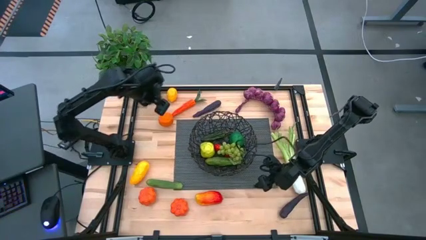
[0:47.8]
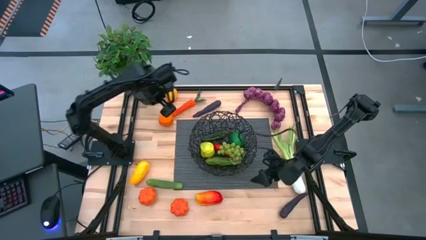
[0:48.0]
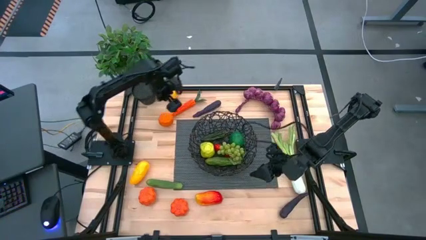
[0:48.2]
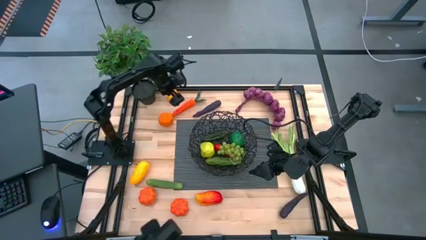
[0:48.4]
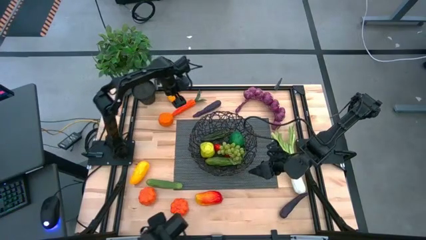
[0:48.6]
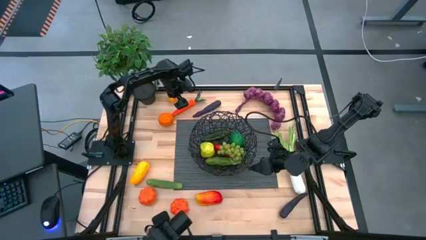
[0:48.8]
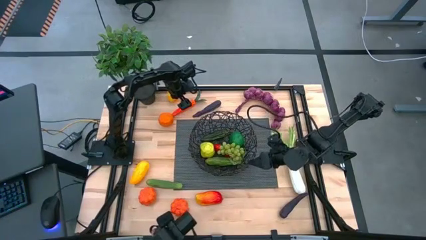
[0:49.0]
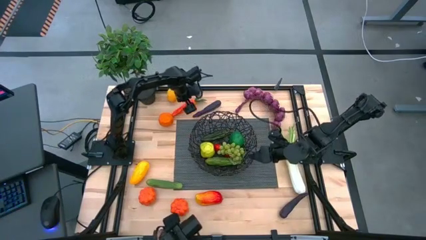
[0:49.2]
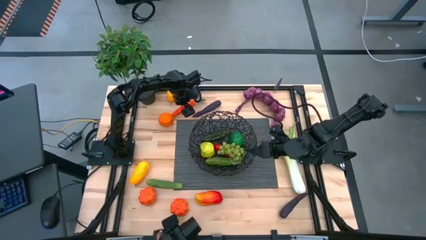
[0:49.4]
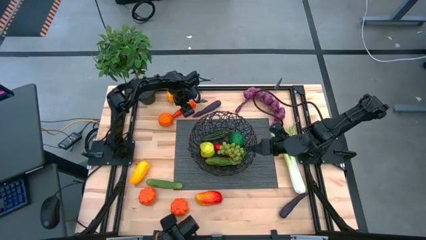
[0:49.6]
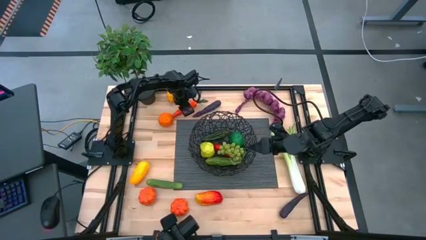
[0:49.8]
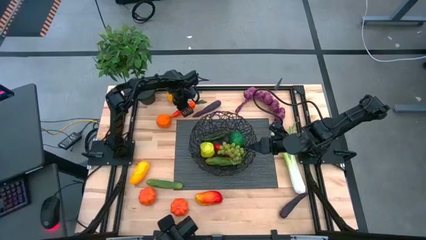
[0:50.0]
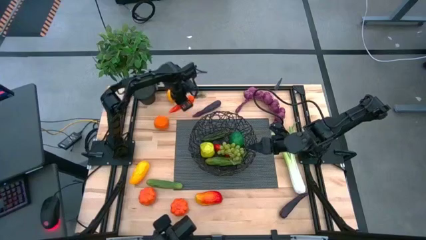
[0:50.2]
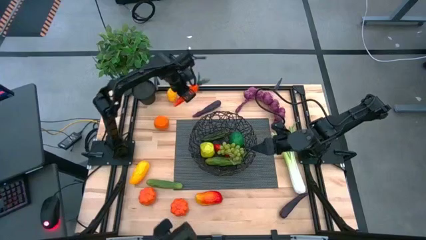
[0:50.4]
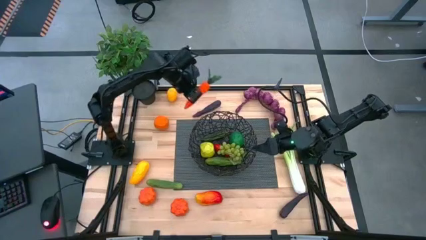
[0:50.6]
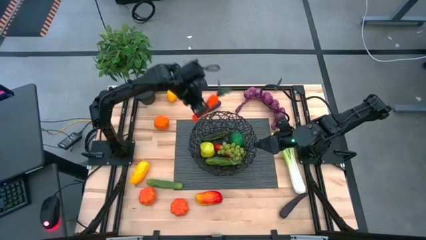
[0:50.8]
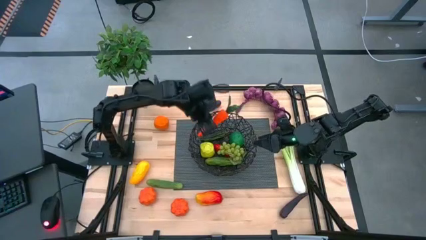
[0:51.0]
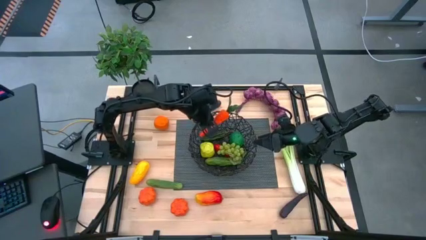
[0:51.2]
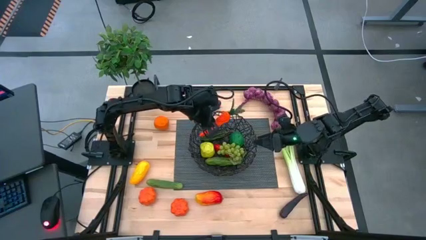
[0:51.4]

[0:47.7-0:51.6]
Task: Build produce basket
Put the carrot into the black basket

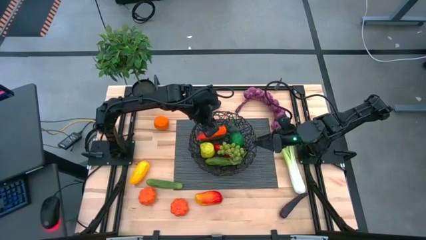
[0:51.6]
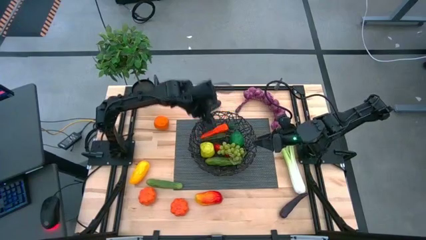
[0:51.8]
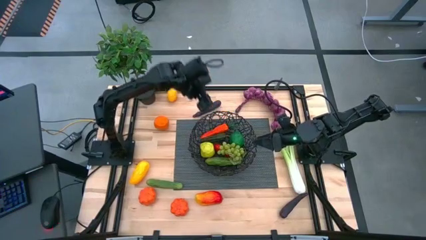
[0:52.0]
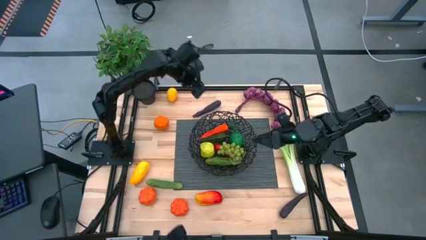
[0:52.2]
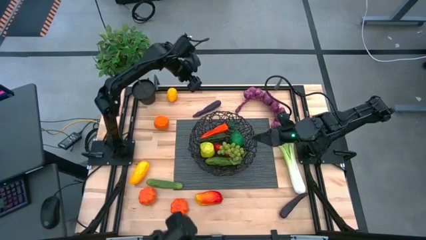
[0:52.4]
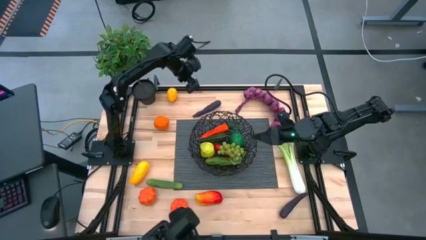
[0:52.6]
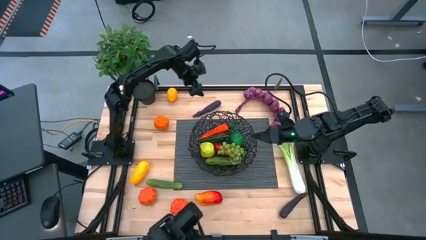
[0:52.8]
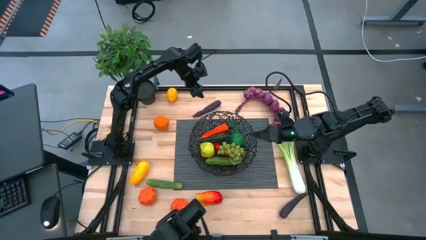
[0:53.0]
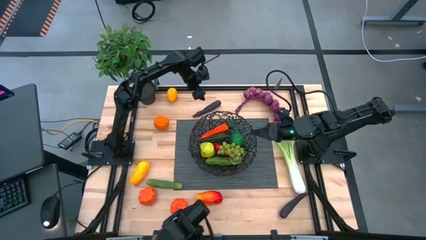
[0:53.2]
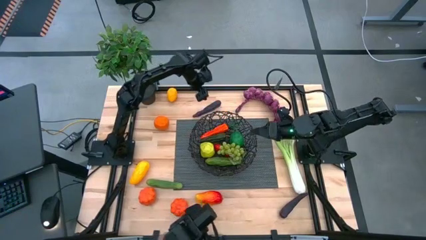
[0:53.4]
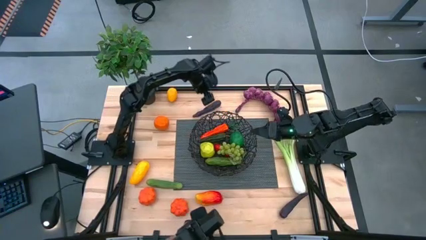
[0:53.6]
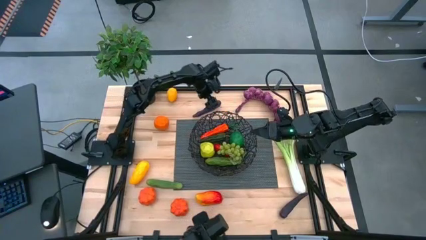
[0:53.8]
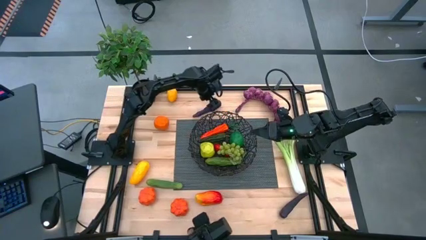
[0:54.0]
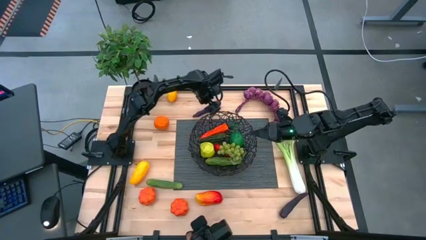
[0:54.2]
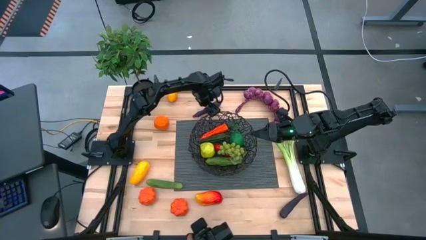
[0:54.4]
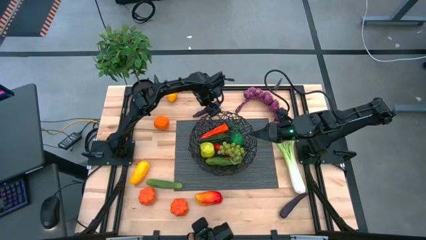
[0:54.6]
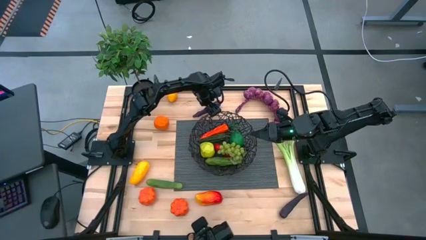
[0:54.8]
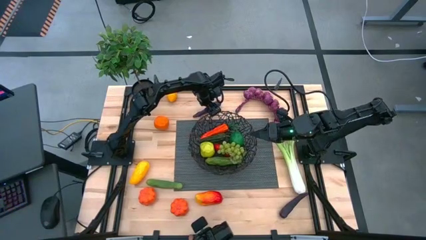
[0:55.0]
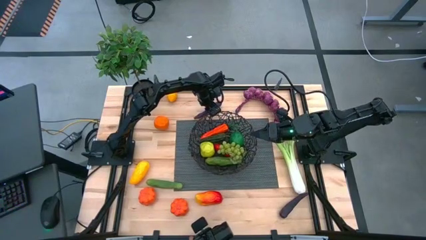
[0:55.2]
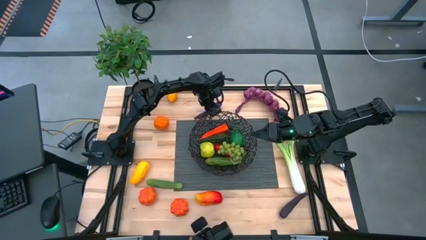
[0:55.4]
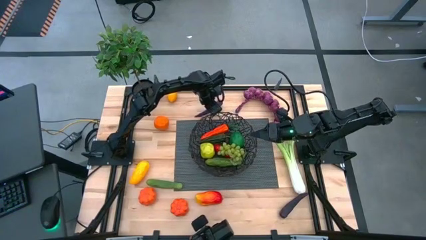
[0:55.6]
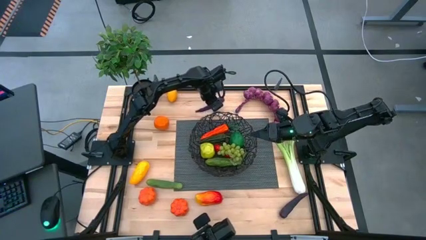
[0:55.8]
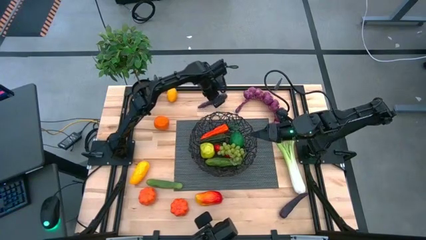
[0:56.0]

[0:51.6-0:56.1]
Put the top eggplant into the black basket

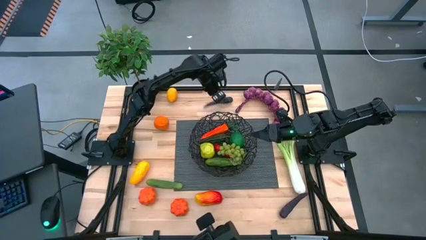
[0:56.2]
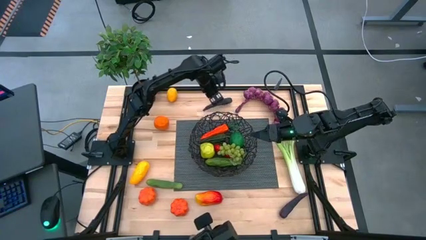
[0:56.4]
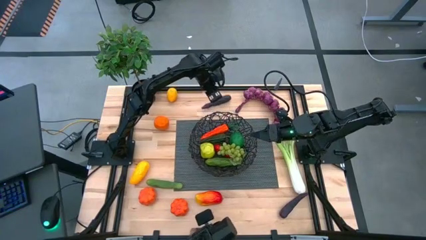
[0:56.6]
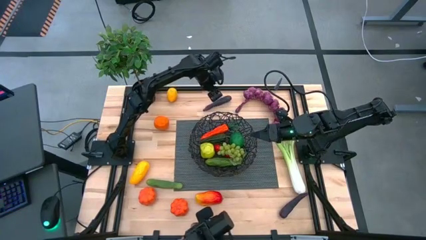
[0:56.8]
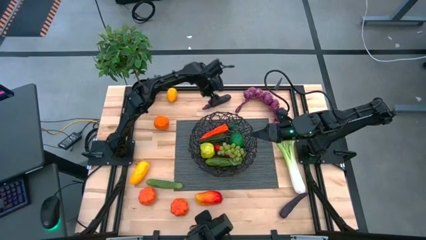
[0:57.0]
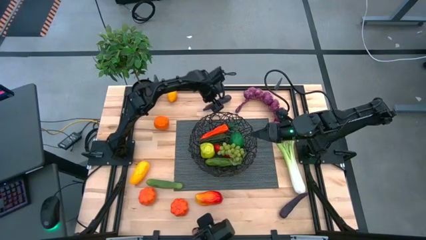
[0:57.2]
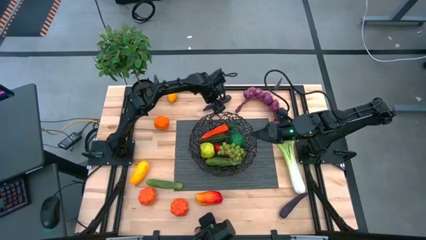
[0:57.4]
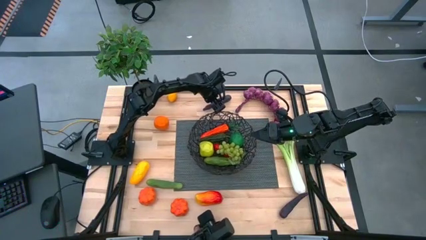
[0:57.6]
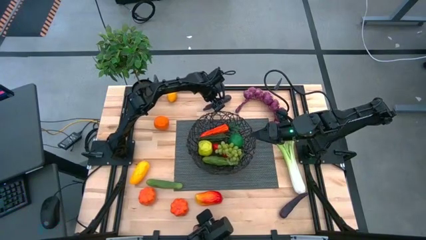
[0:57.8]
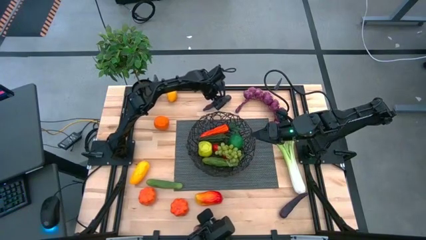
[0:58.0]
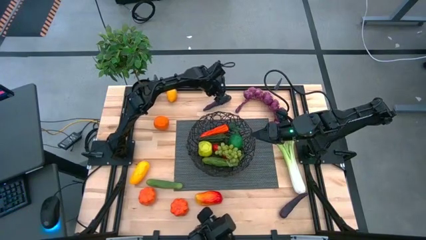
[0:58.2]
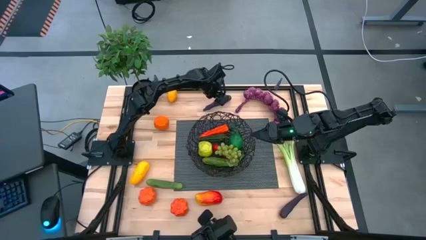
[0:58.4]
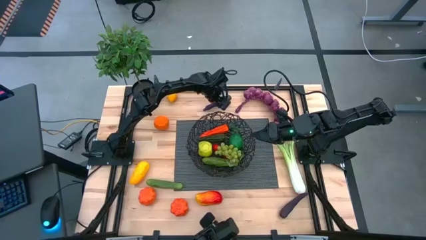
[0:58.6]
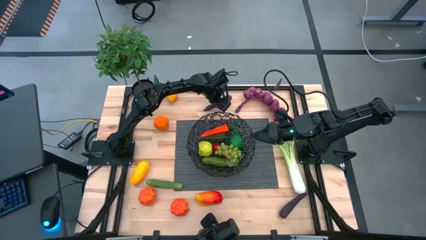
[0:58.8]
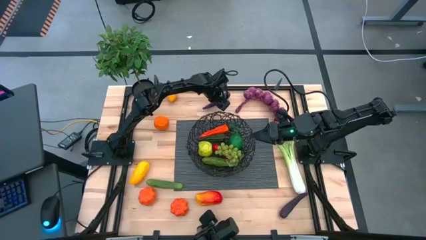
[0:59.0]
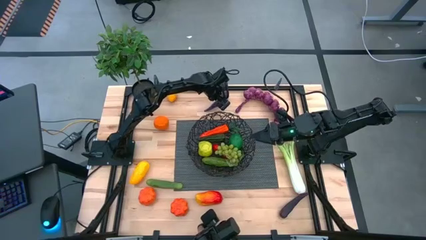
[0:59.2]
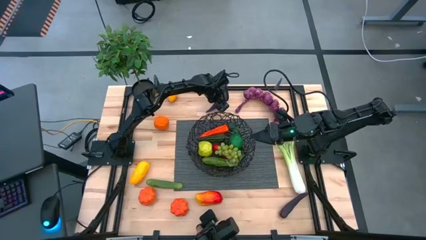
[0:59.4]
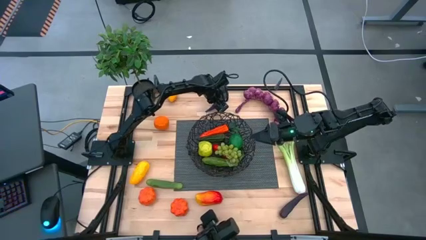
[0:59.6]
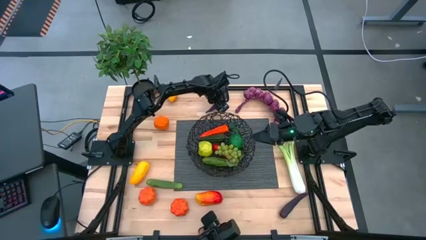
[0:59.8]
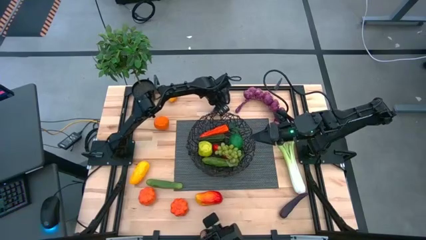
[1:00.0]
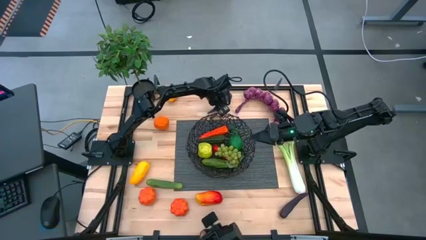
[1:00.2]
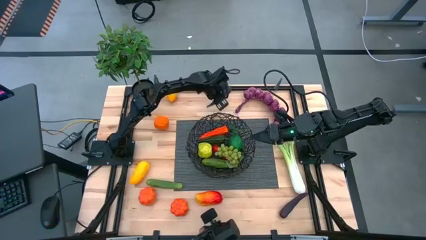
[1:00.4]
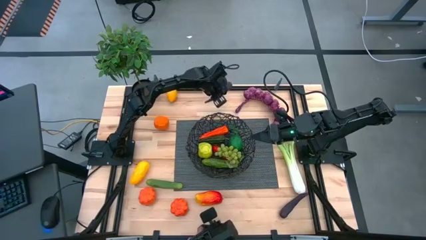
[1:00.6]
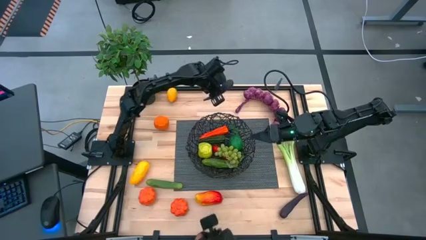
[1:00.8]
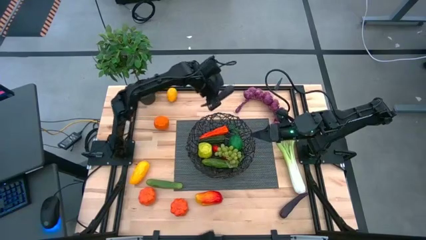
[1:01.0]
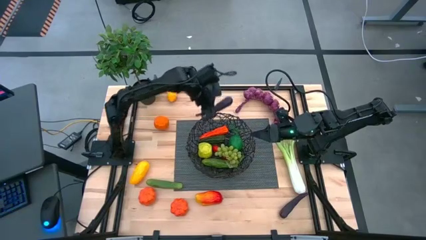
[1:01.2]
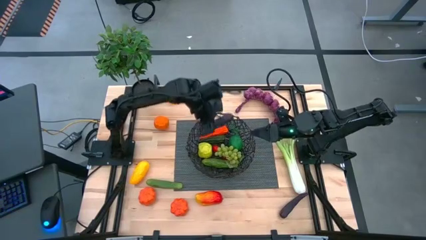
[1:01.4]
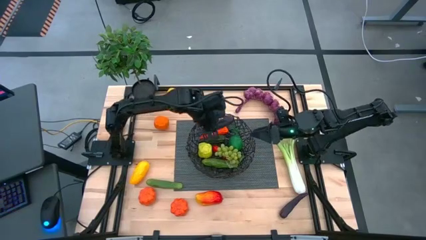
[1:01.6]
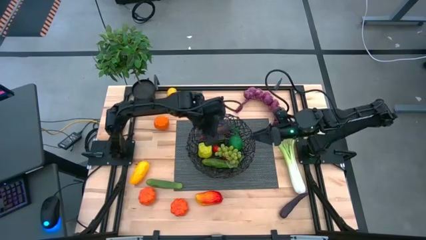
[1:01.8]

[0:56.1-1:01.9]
Put the top eggplant into the black basket

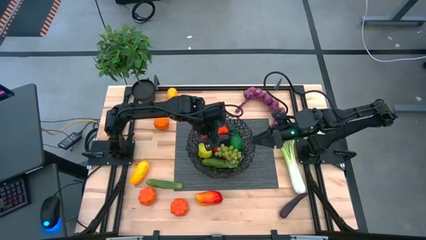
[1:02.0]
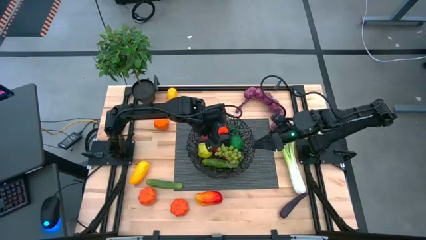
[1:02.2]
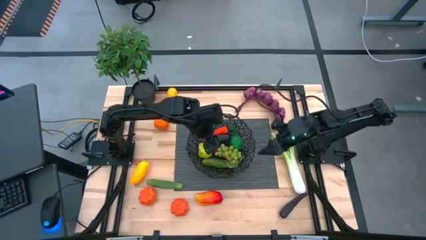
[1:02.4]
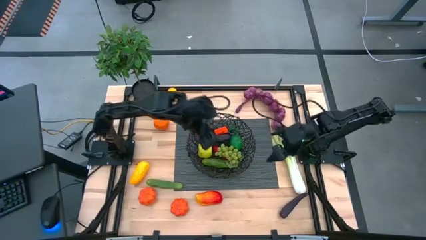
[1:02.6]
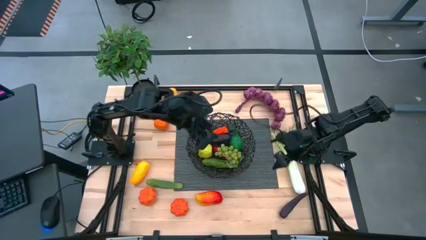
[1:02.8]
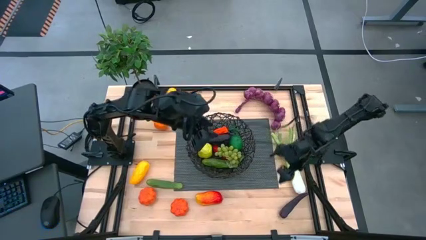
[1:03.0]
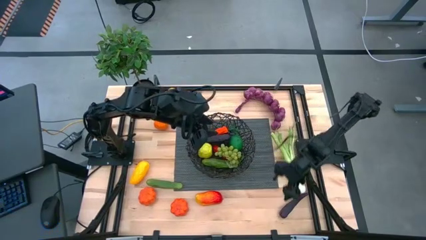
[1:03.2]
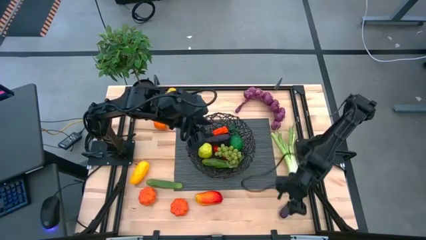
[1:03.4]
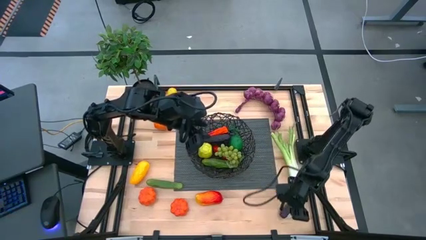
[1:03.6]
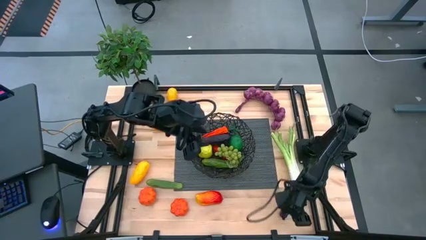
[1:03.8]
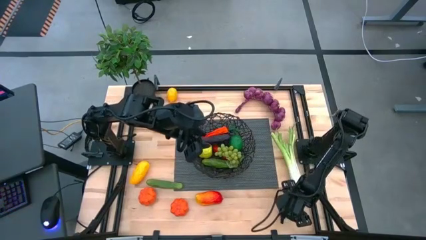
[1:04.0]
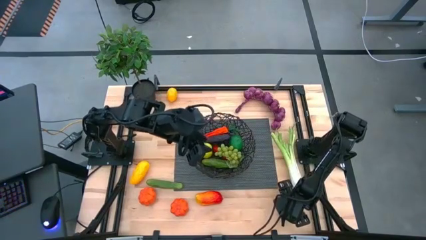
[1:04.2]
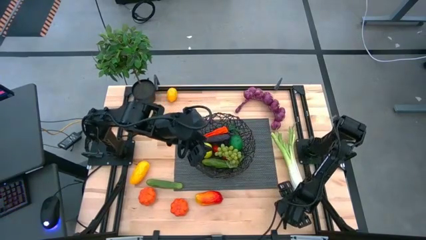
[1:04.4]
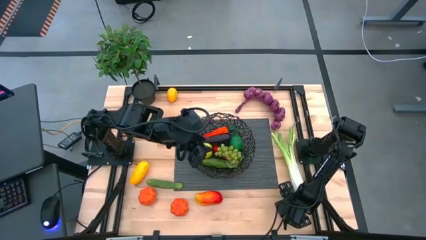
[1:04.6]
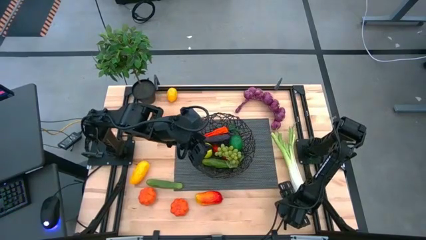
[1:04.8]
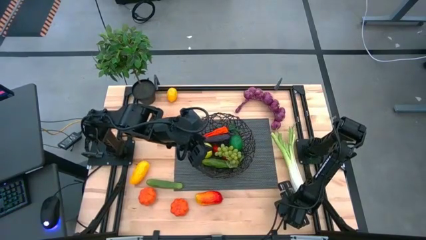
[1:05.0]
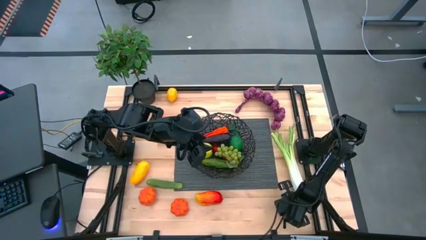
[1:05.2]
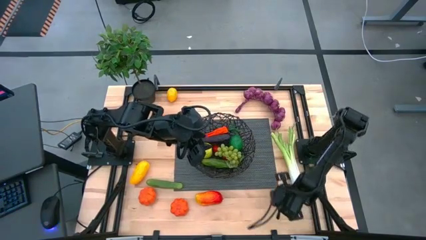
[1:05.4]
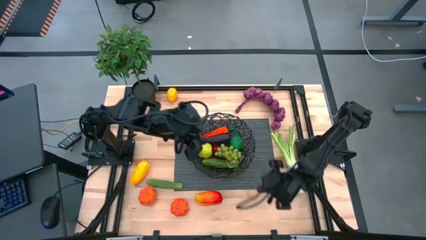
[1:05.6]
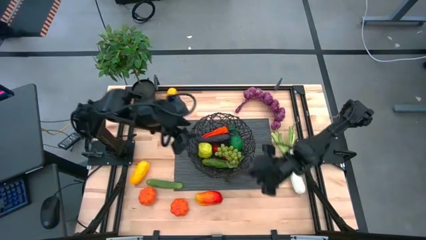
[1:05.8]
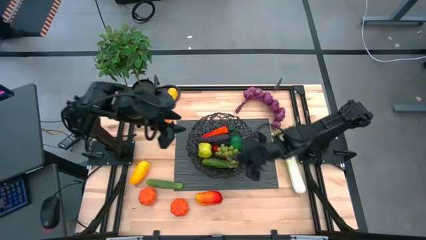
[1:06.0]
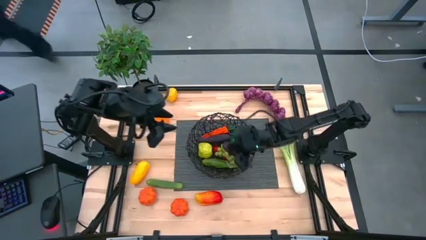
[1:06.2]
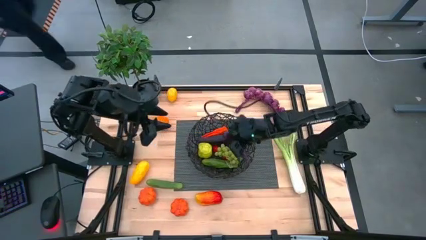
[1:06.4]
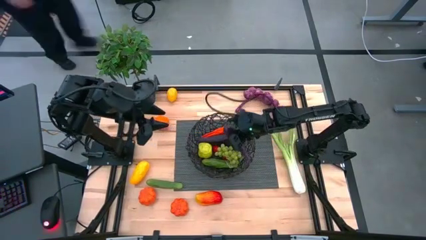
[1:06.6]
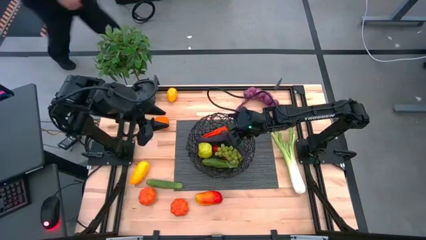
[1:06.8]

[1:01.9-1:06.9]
Put the eggplant into the black basket
